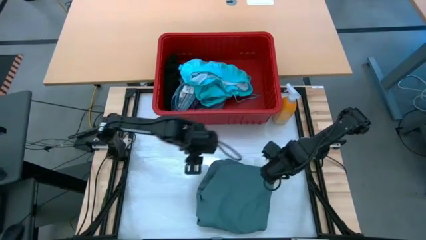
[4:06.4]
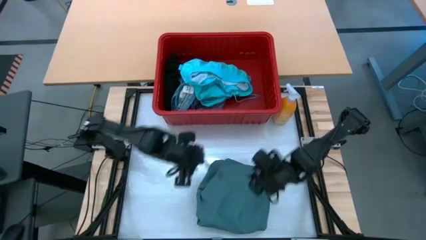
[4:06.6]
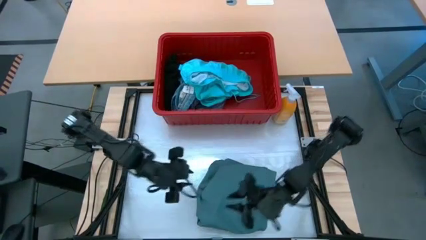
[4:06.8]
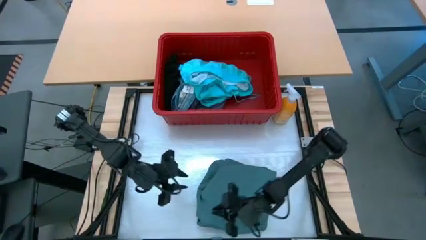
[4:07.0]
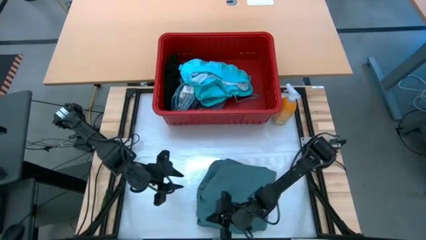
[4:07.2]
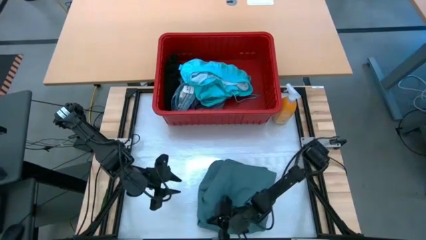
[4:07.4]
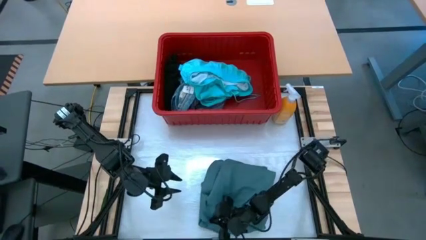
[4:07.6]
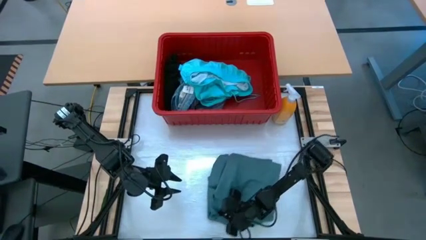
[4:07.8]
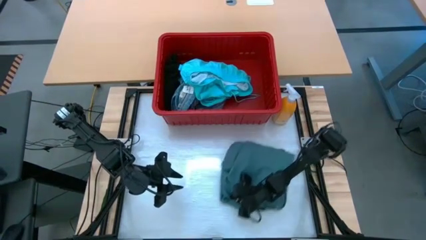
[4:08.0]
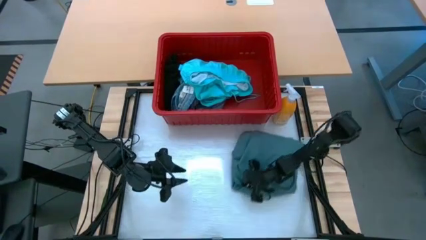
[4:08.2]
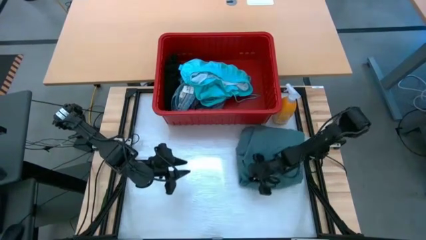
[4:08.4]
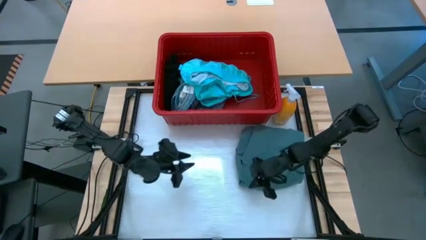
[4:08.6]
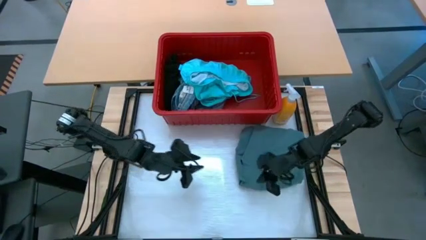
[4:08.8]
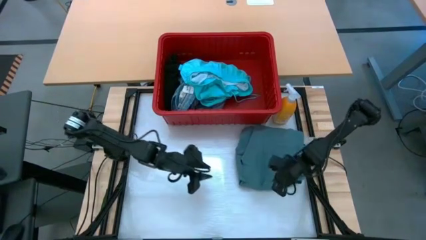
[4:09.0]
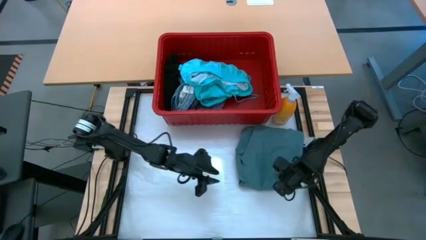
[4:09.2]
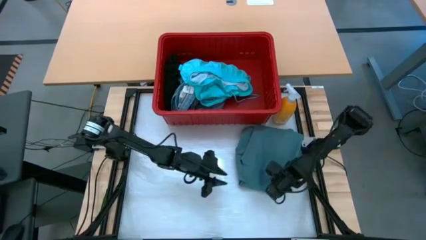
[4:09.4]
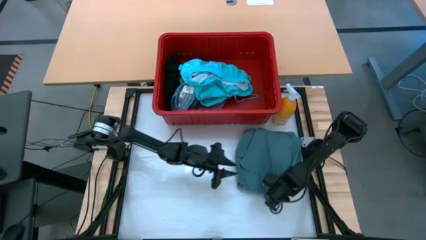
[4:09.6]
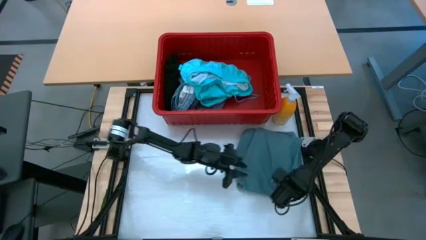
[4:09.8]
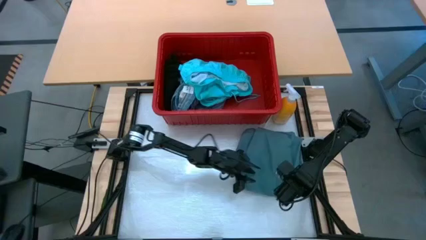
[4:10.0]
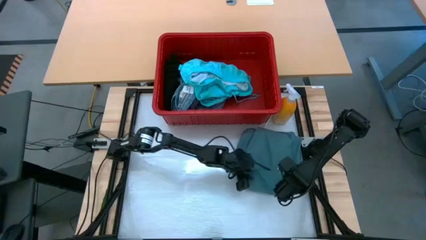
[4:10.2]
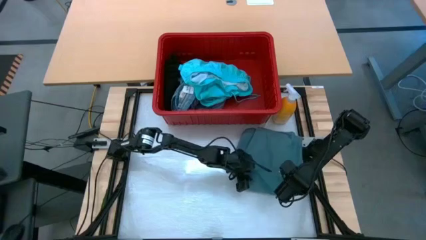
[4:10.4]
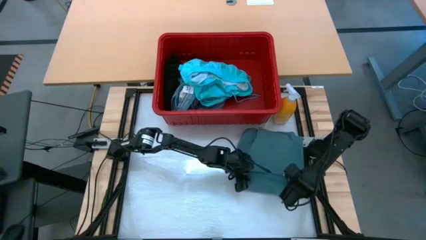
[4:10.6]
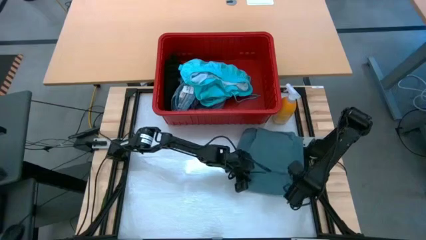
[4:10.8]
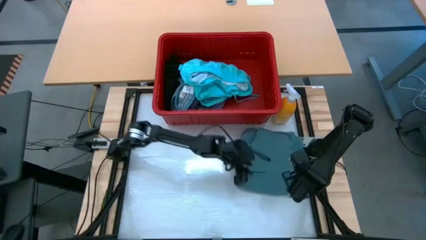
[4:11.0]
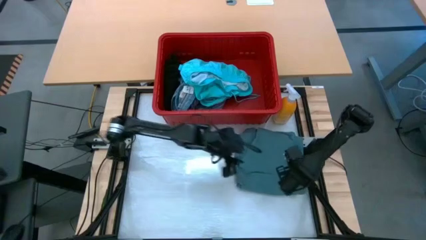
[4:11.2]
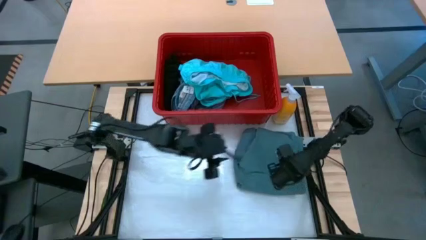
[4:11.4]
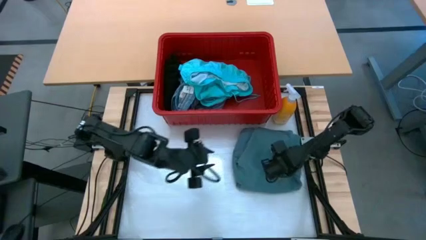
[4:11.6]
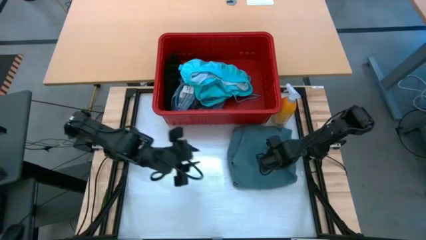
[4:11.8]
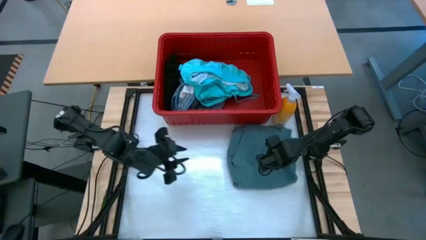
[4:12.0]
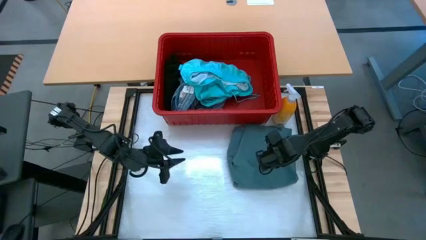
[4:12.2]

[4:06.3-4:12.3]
Task: Fold Laundry from Bin
Move the light blue pants to the right

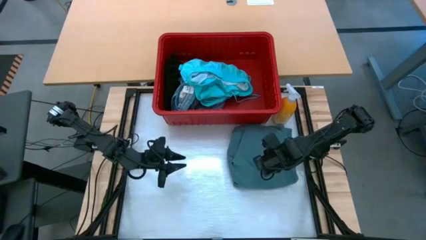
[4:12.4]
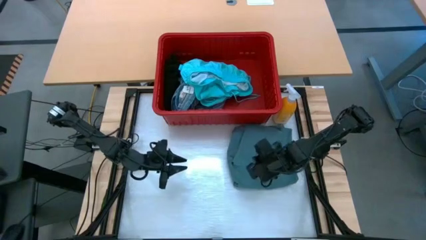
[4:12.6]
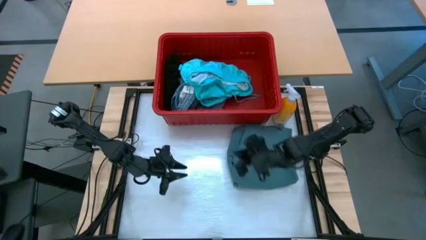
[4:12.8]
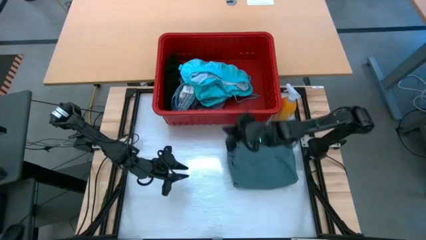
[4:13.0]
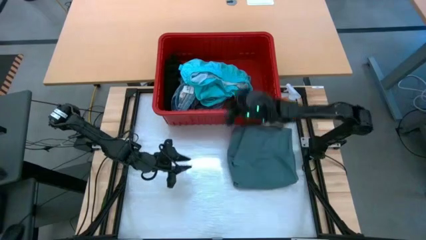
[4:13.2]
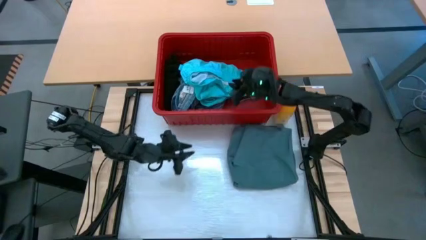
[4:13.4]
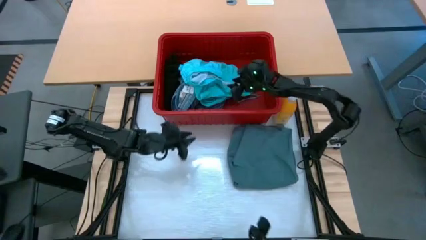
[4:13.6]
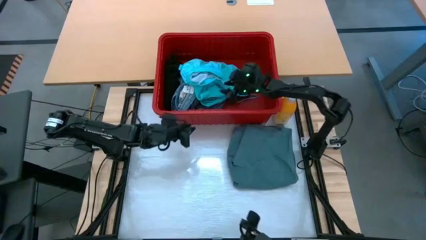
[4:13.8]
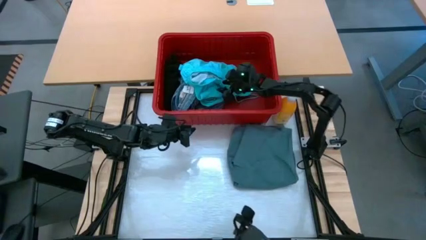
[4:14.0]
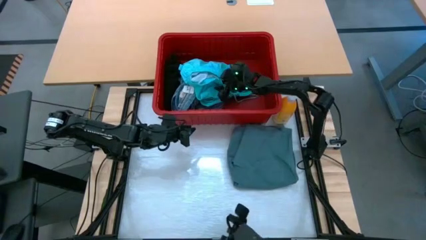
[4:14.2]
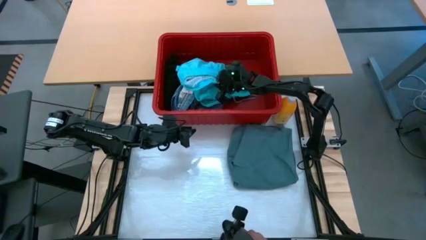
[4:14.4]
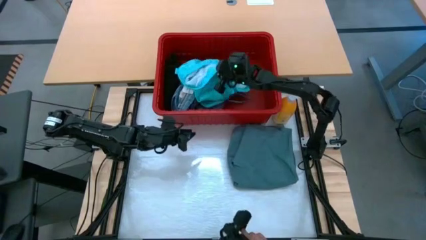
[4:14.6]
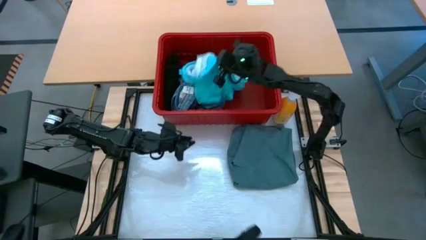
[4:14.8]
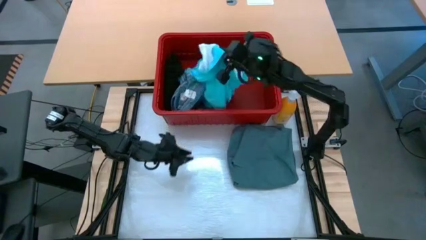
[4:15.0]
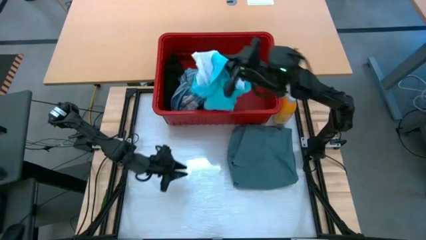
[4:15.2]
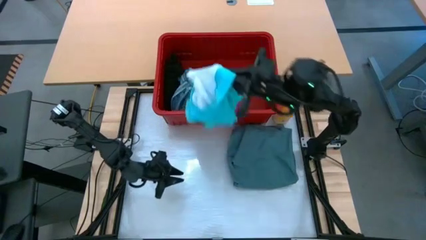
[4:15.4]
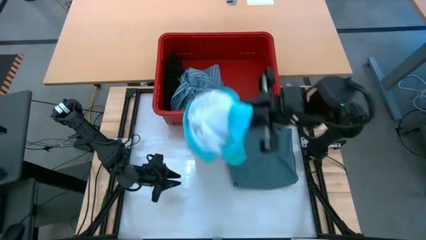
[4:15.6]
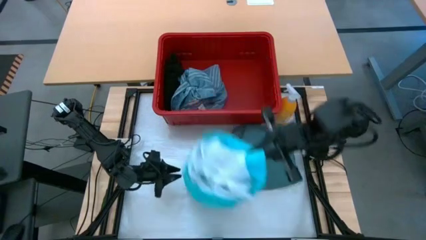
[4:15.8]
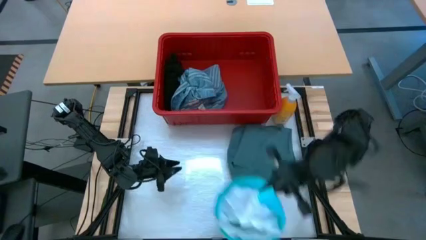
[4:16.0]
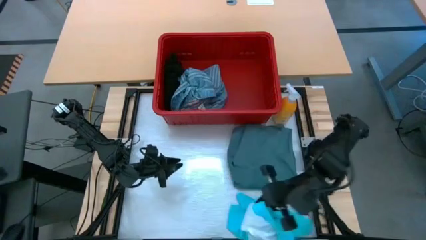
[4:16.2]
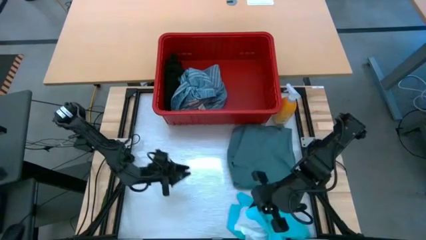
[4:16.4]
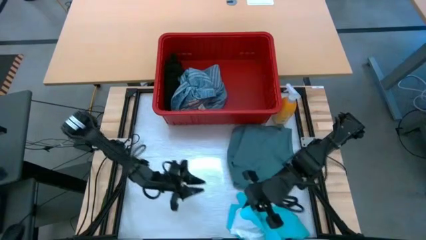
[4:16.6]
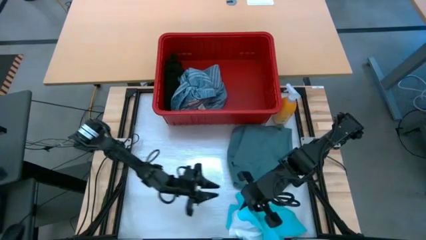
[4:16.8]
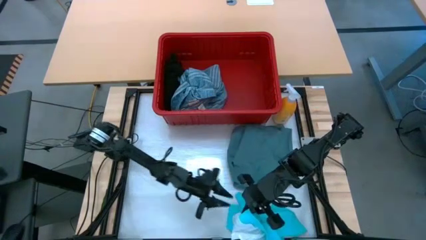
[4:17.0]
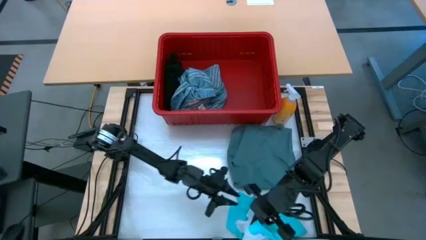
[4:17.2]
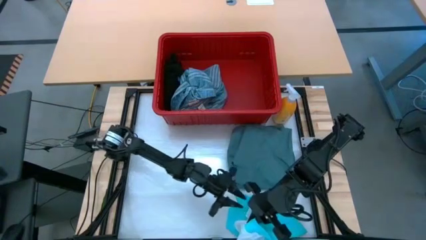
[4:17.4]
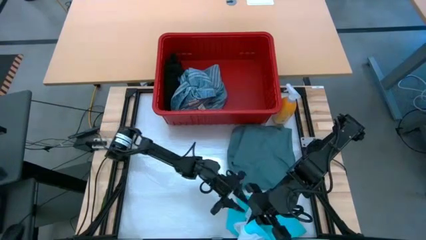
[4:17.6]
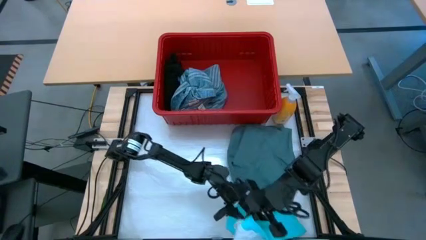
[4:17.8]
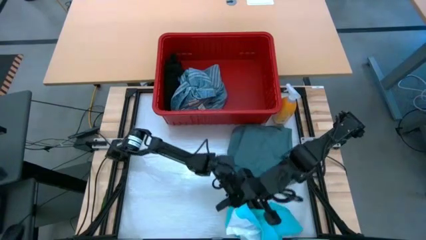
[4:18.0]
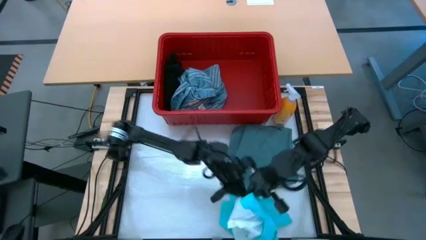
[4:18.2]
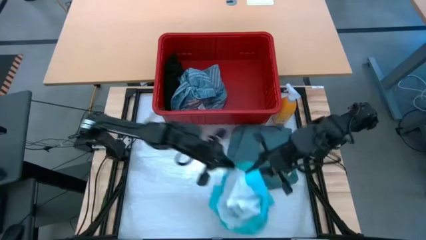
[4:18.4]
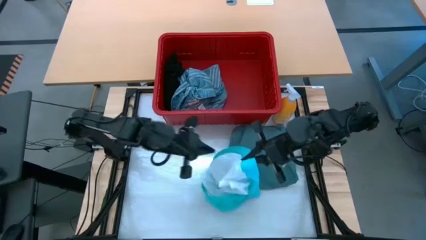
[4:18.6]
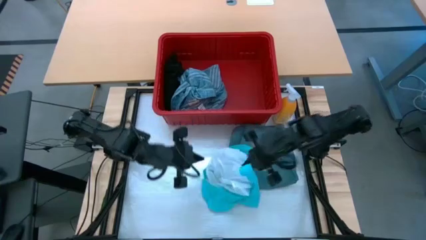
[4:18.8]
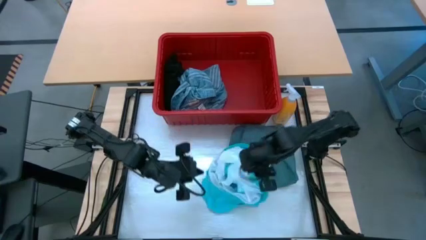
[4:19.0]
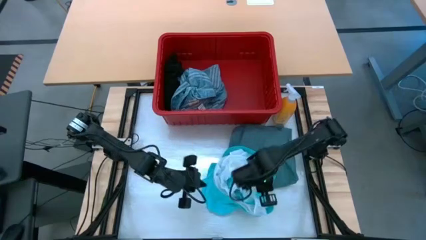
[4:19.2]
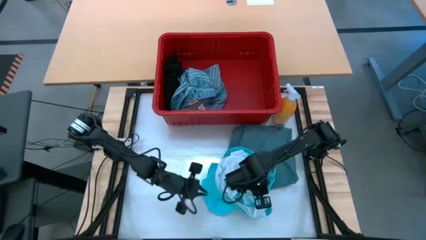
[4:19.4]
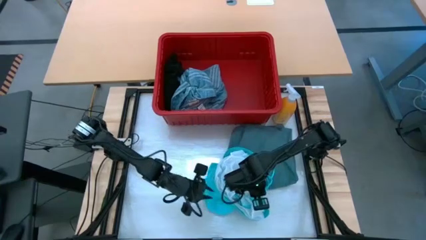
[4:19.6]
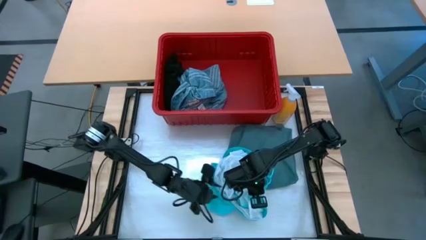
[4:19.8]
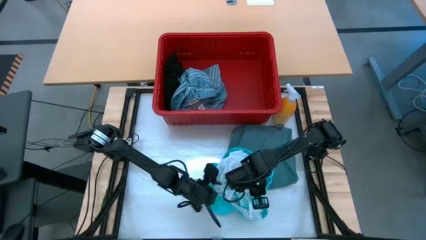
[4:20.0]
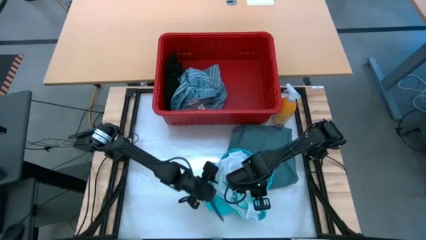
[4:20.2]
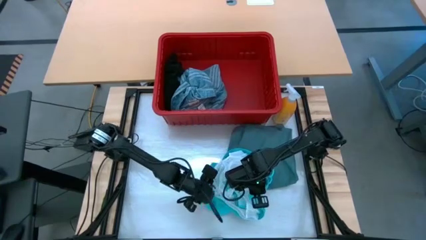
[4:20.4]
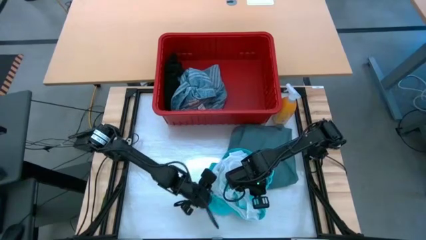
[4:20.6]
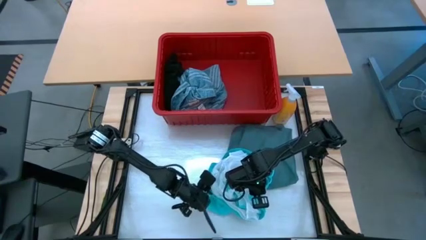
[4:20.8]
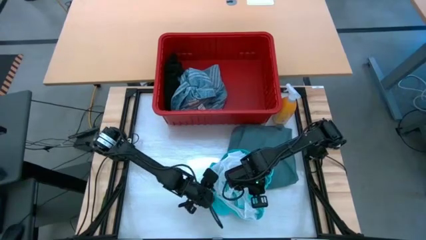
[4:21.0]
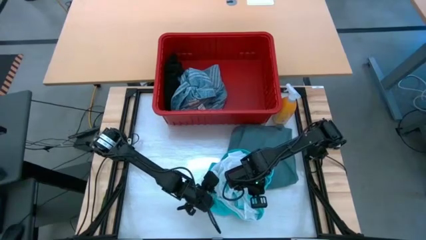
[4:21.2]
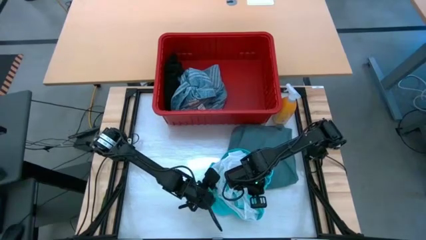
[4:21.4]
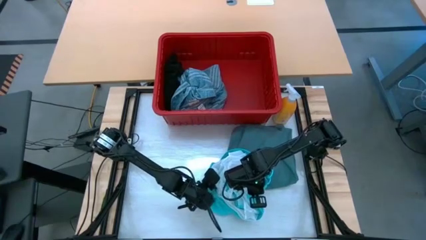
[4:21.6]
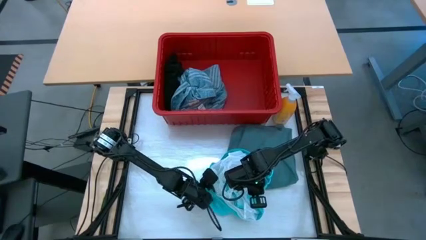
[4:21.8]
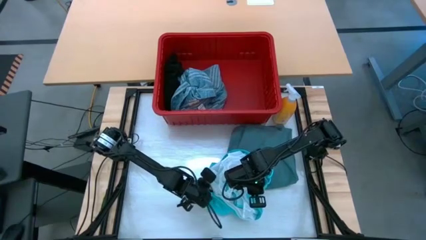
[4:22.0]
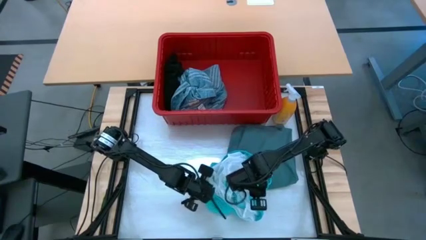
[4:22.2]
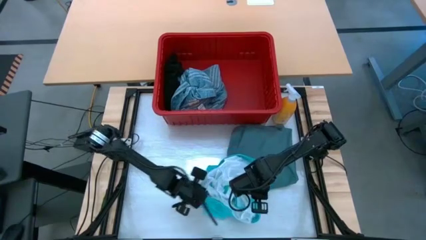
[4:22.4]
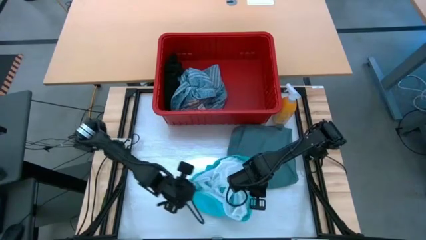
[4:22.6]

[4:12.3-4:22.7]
Remove the sky blue shorts from the red laundry bin
